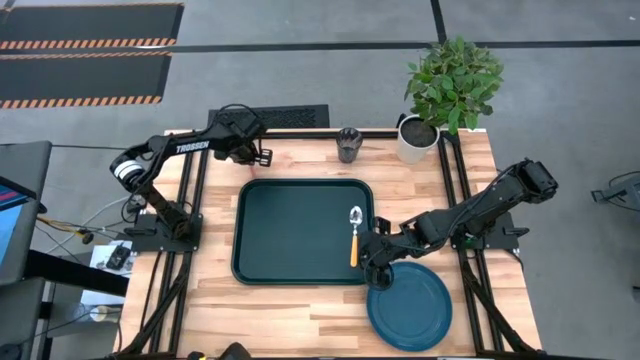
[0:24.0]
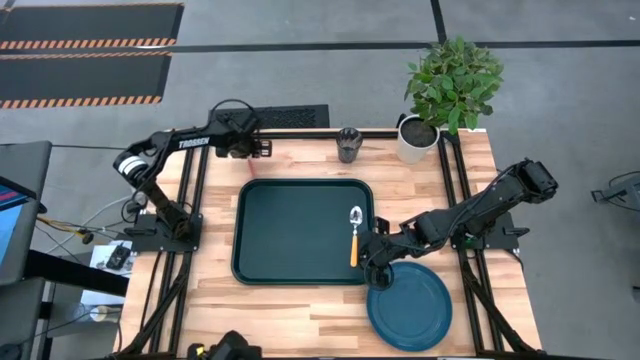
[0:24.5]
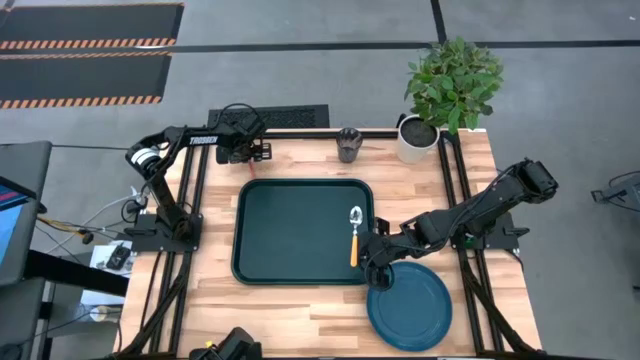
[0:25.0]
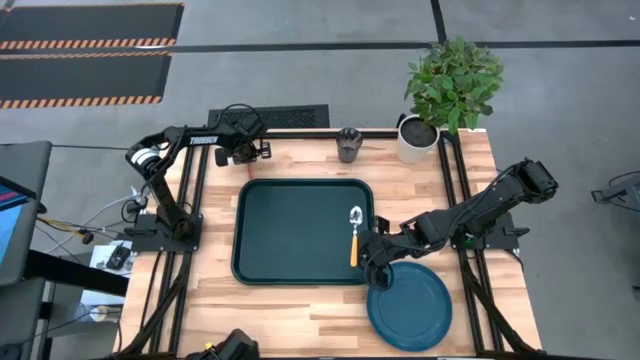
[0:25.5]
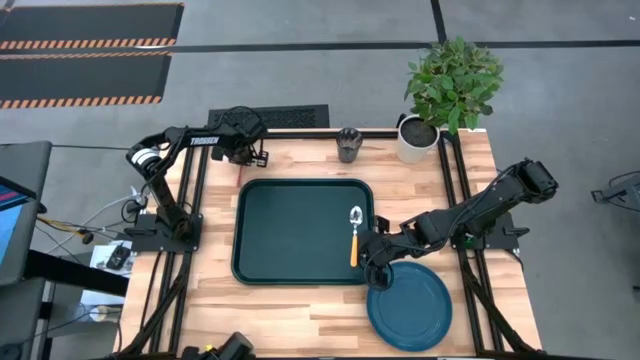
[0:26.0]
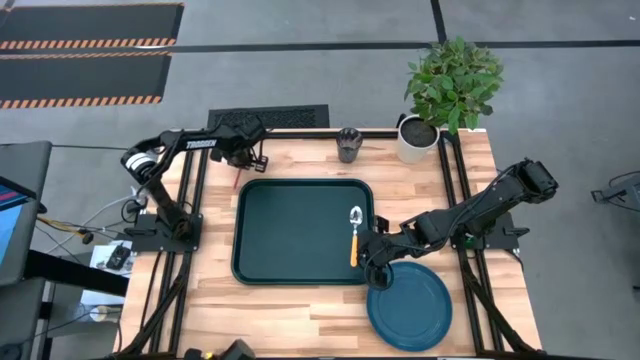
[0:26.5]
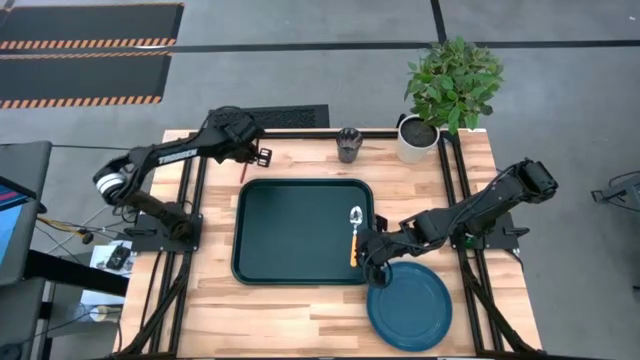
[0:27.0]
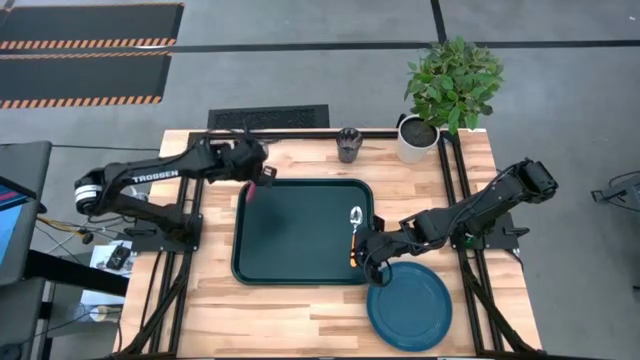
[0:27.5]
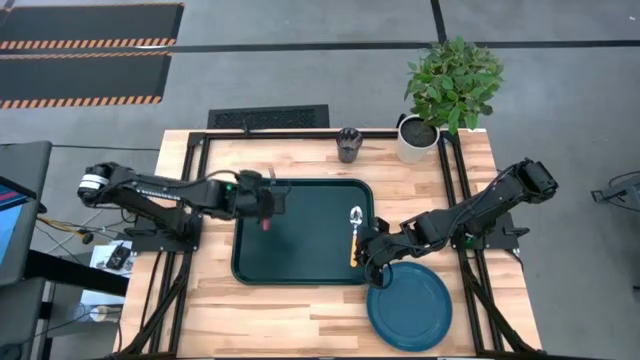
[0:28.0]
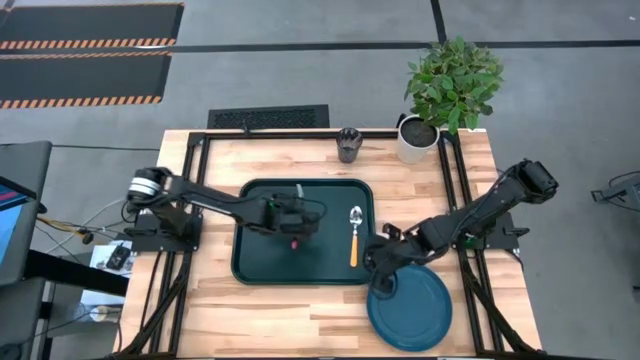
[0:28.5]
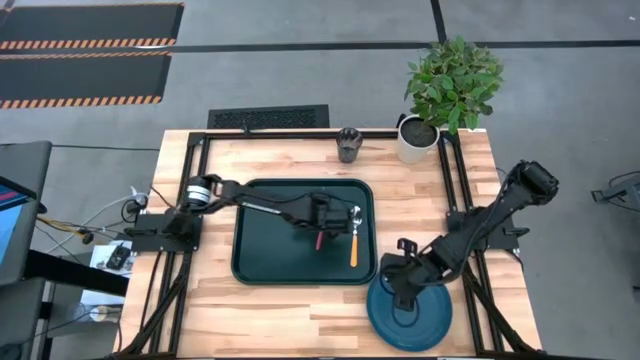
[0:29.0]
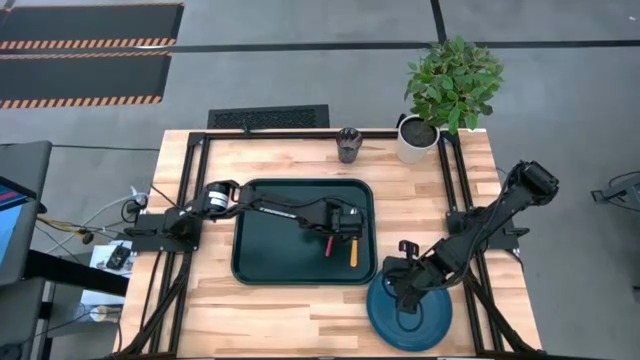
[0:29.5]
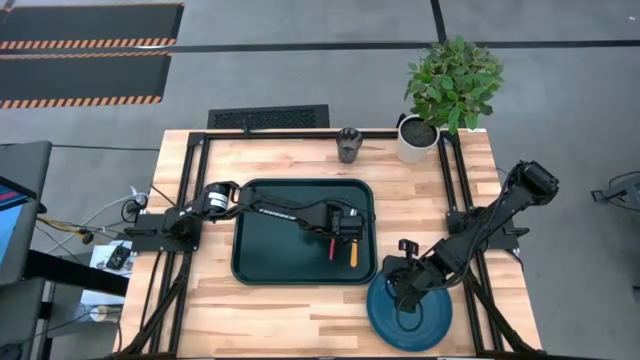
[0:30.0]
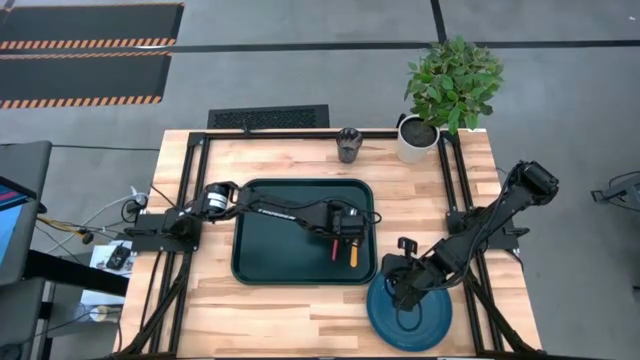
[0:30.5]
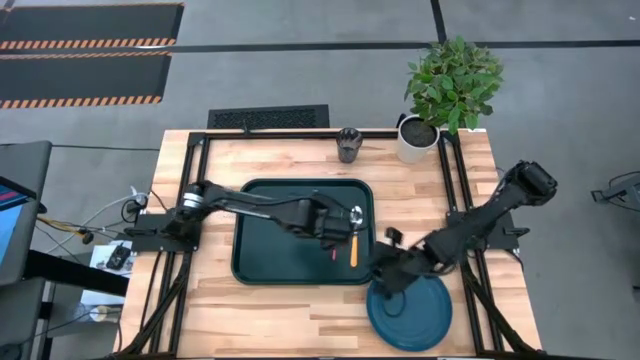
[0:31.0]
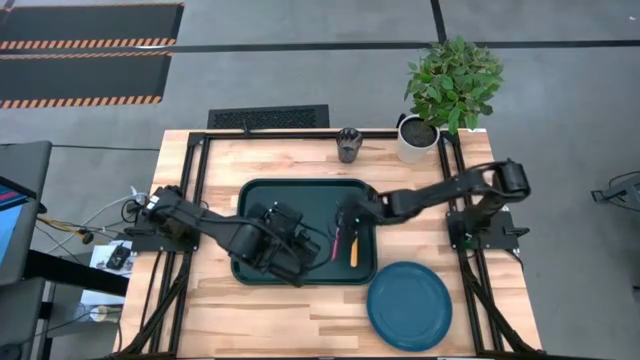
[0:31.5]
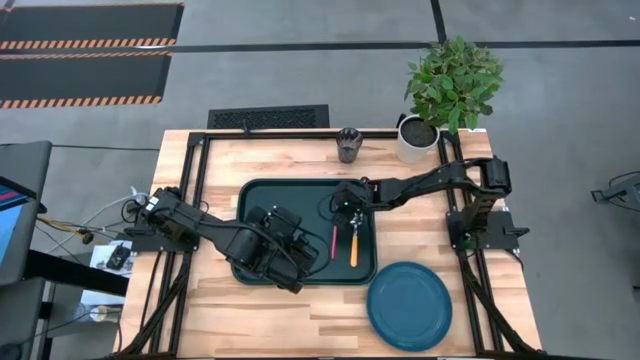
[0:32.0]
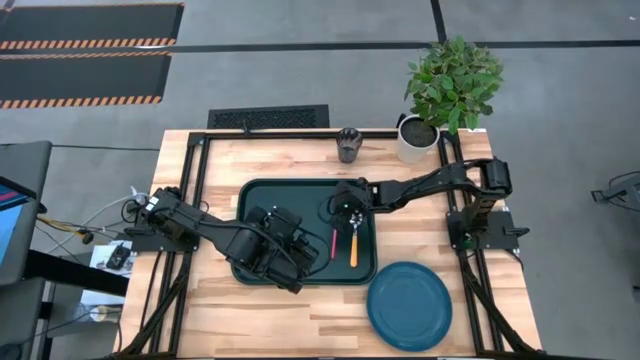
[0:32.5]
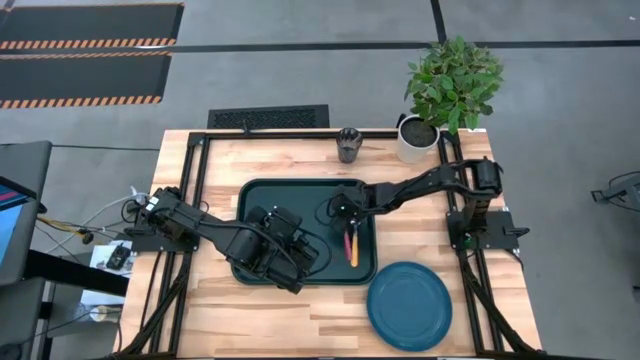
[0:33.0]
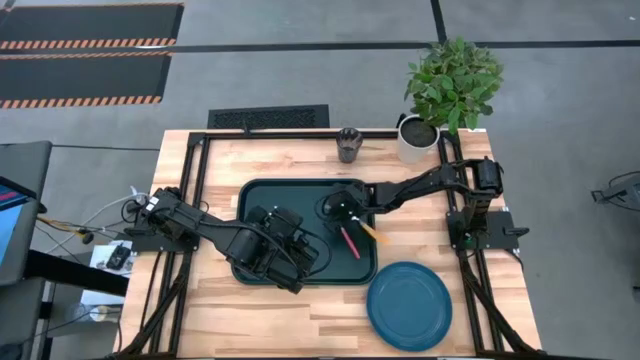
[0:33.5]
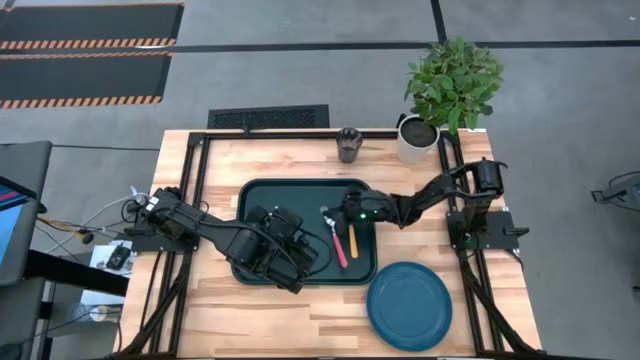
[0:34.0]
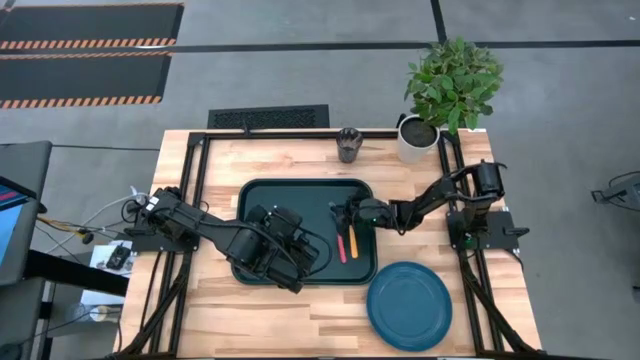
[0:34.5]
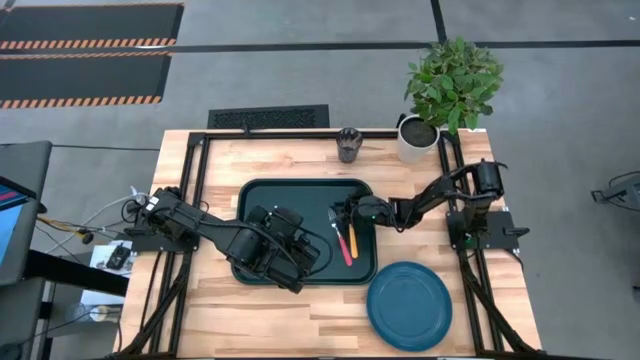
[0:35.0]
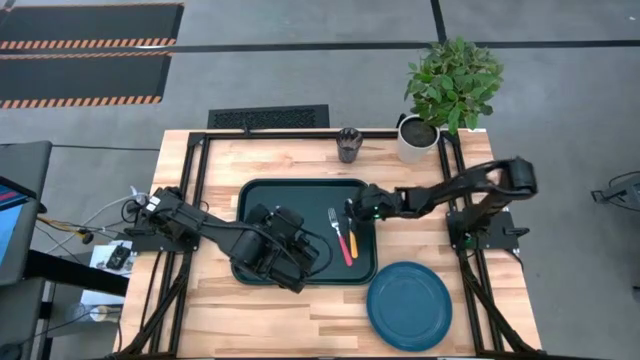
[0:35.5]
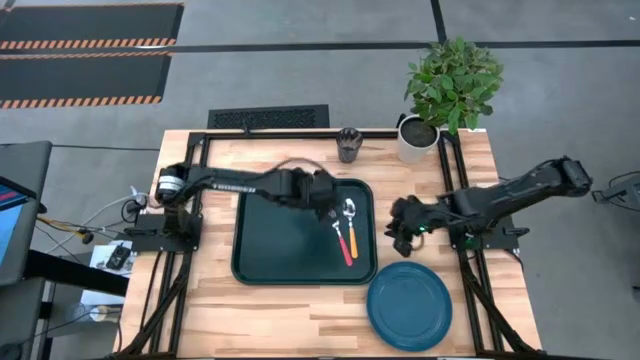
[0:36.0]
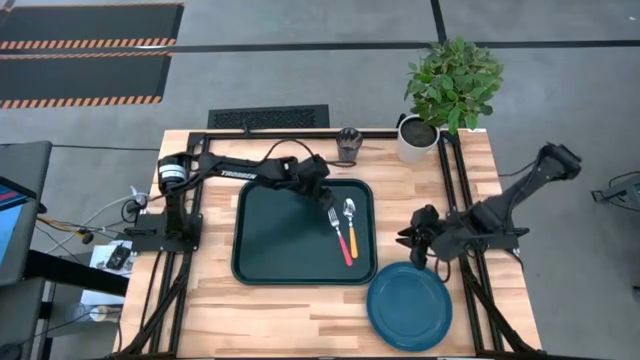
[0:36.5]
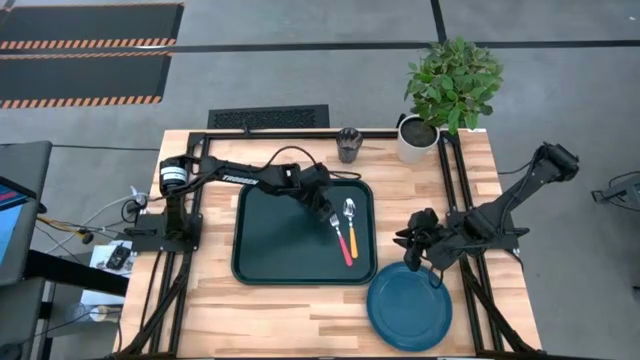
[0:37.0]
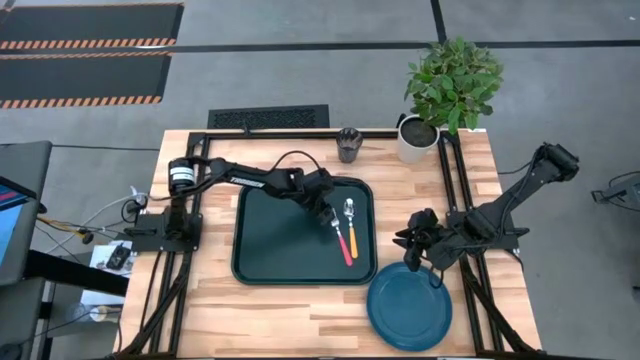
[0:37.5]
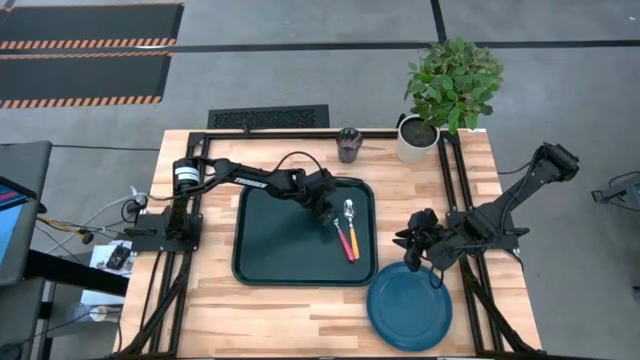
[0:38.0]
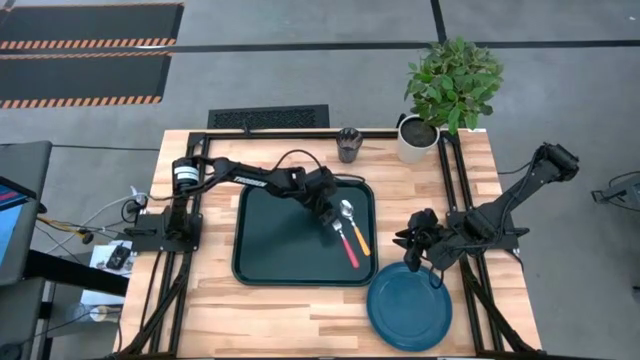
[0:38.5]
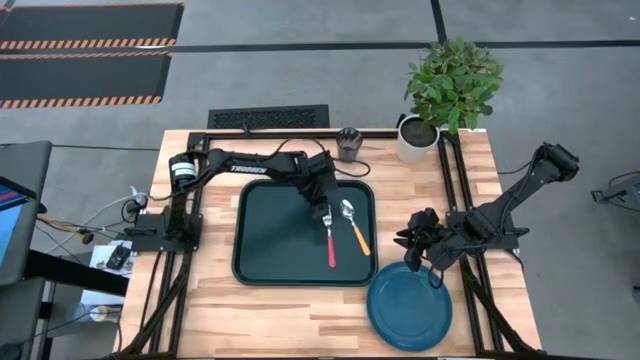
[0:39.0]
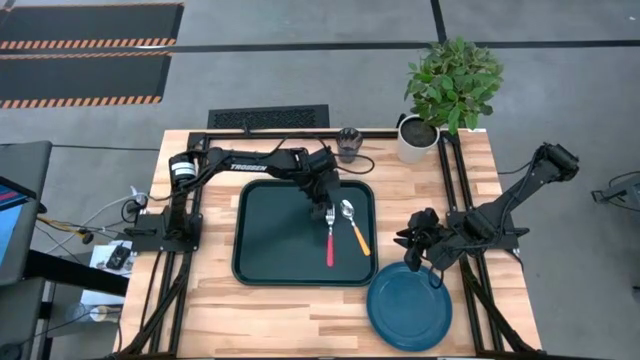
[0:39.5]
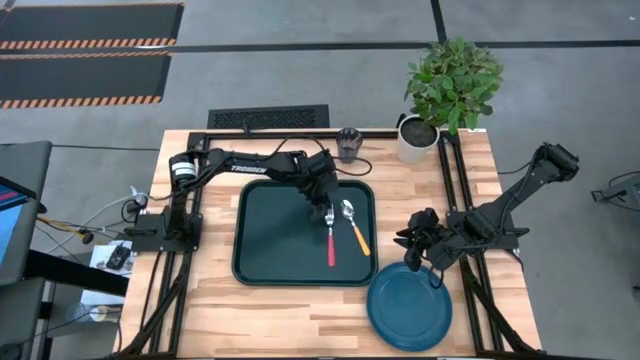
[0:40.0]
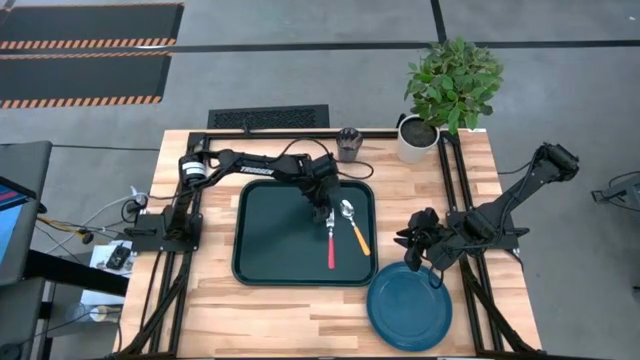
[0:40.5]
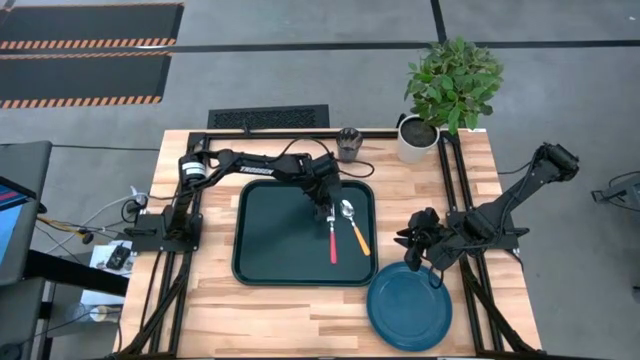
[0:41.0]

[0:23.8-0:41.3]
Task: Pick and place plate/cup/fork/spoon on tray
Put the fork on the black serving tray

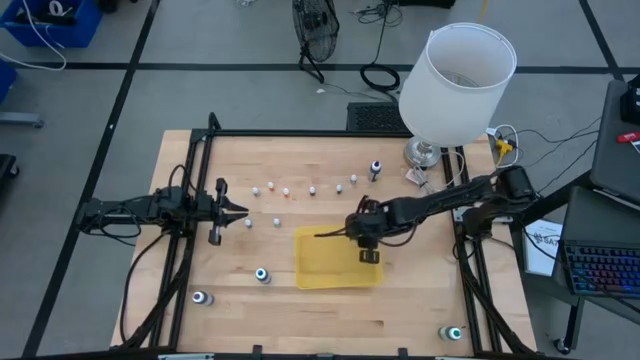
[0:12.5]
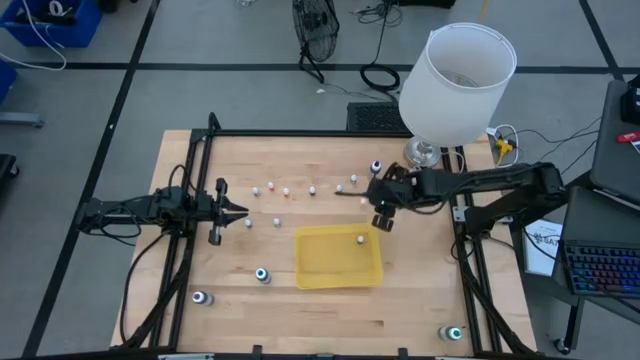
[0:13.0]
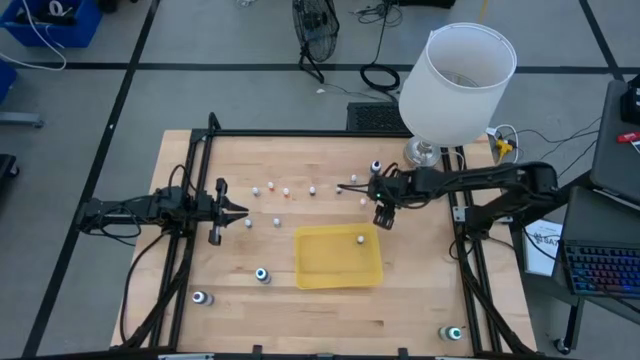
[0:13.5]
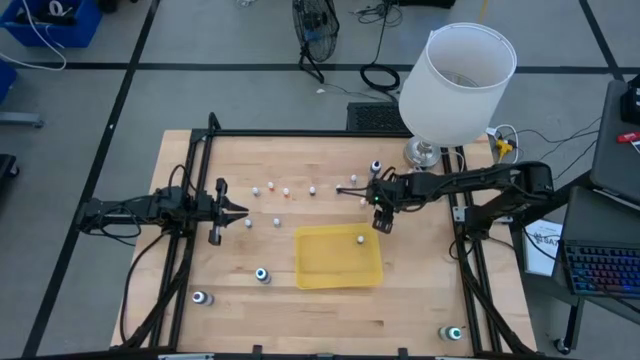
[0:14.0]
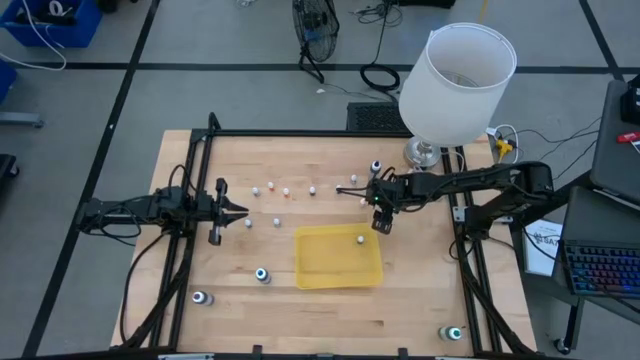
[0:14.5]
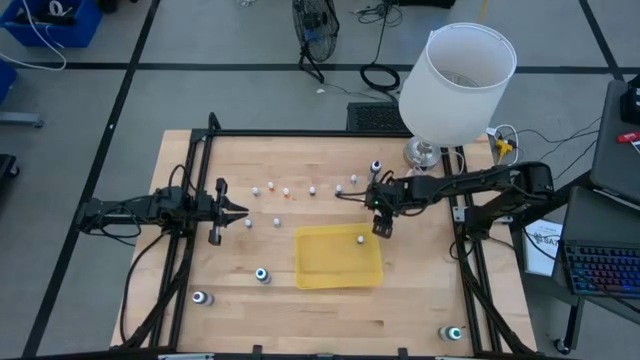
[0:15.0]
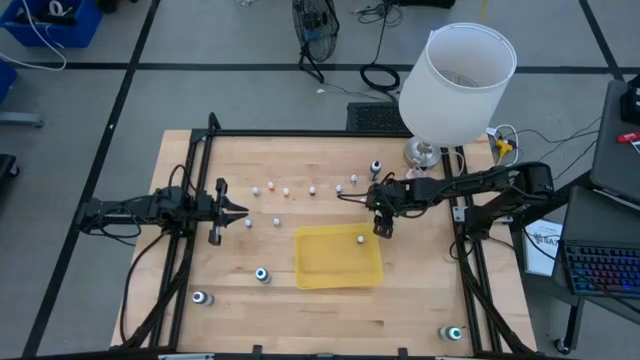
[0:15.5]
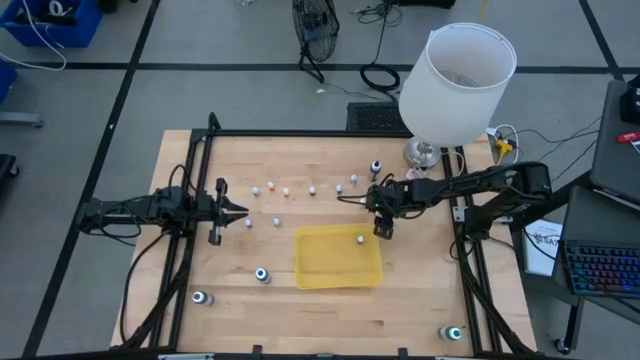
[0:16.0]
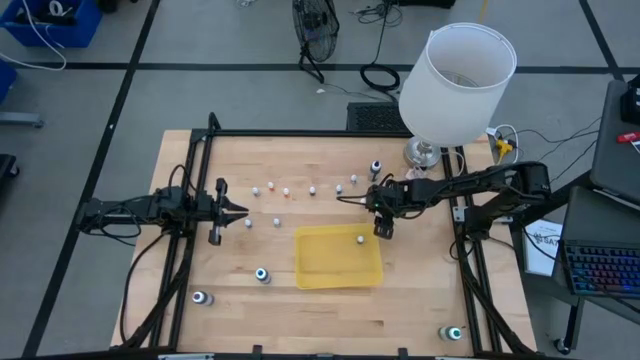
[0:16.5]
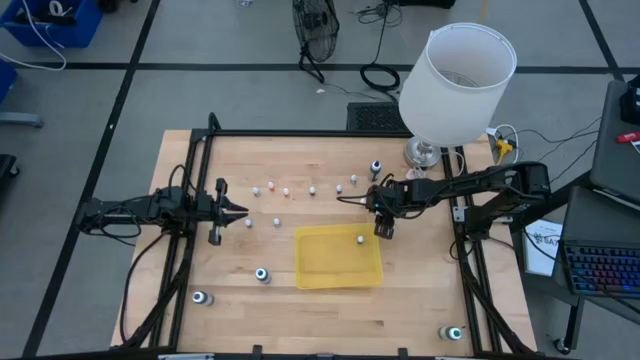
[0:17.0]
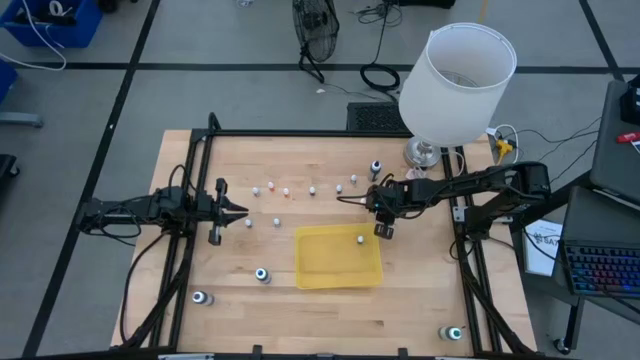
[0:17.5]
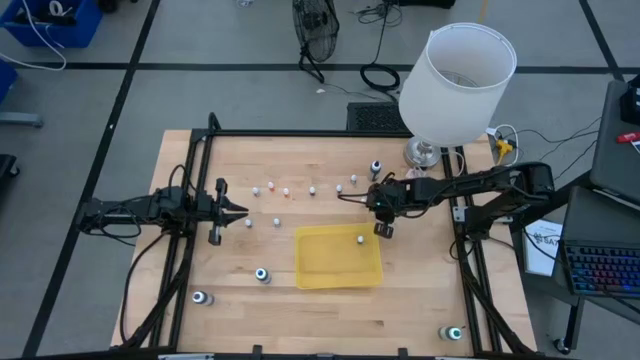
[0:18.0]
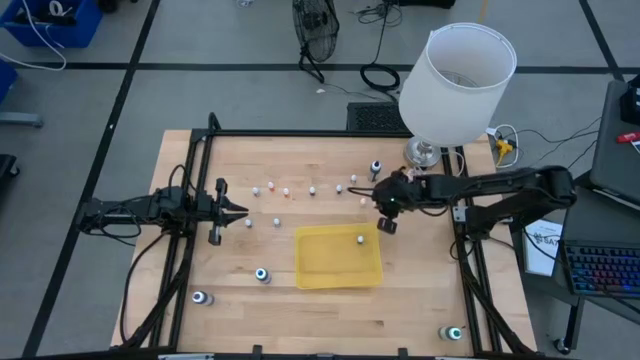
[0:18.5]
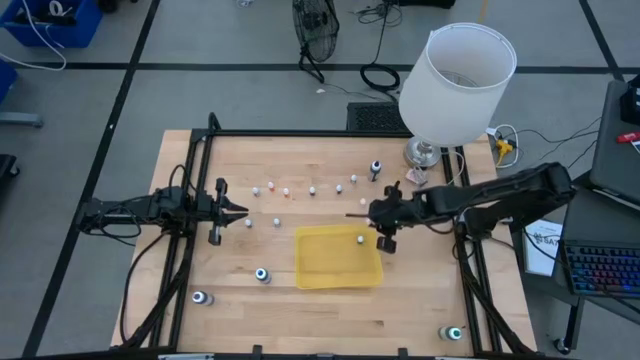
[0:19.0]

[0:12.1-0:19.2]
Task: Pick & Place food coloring
Put the small orange food coloring bottle into the yellow bin
